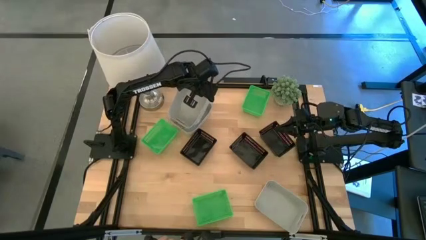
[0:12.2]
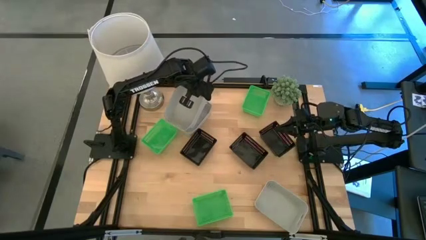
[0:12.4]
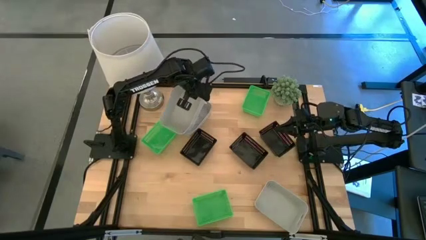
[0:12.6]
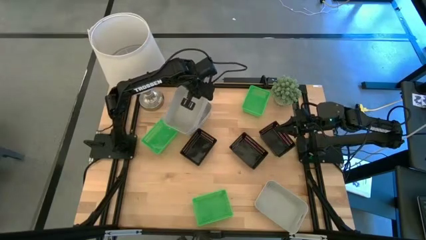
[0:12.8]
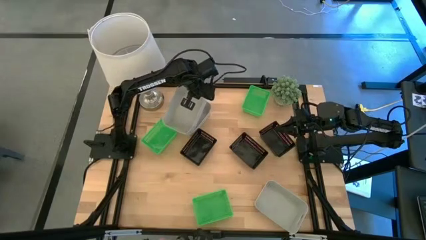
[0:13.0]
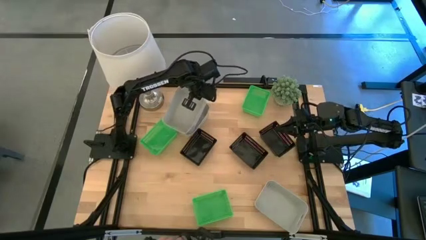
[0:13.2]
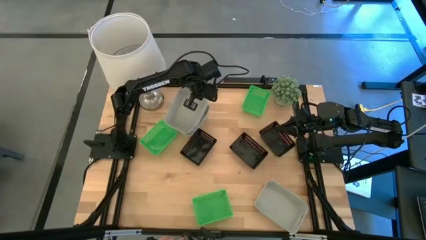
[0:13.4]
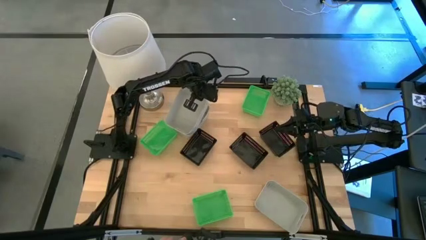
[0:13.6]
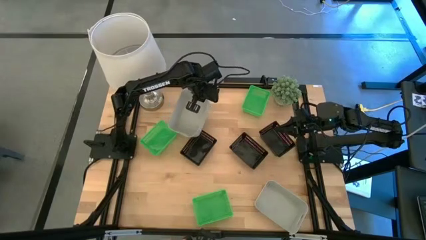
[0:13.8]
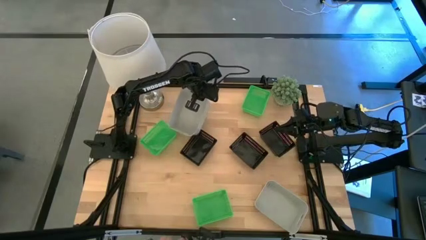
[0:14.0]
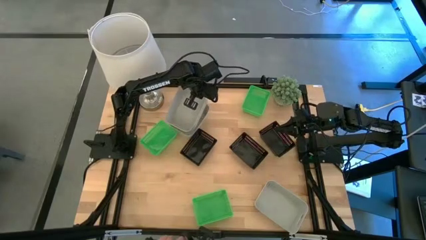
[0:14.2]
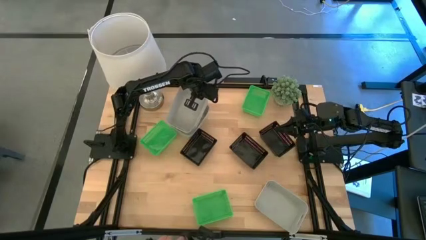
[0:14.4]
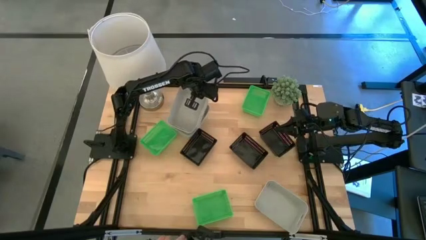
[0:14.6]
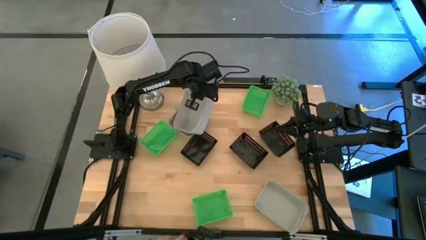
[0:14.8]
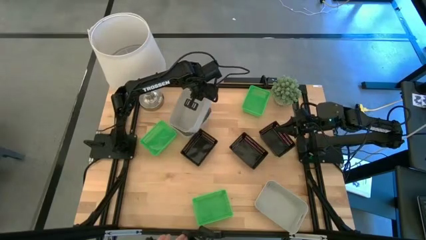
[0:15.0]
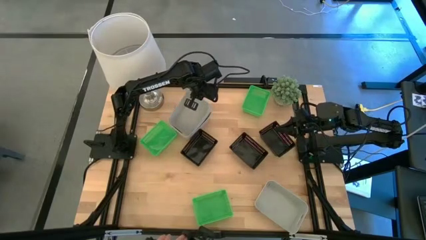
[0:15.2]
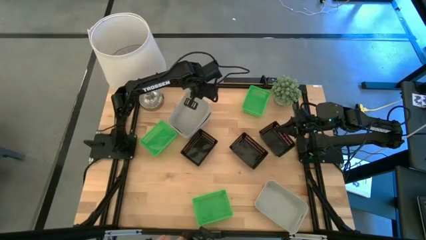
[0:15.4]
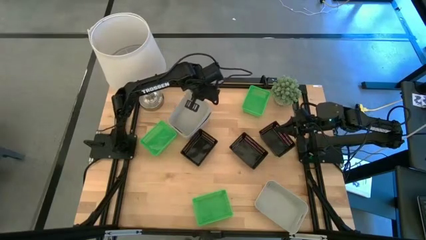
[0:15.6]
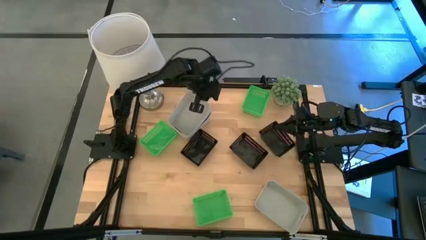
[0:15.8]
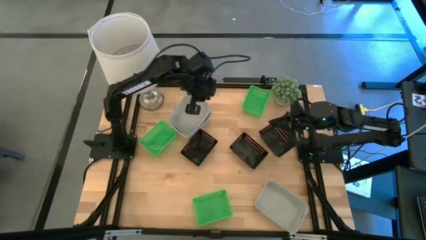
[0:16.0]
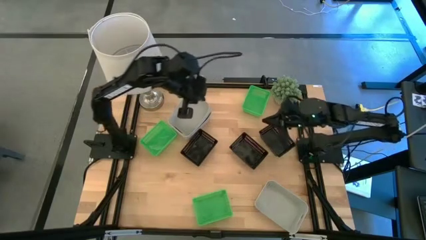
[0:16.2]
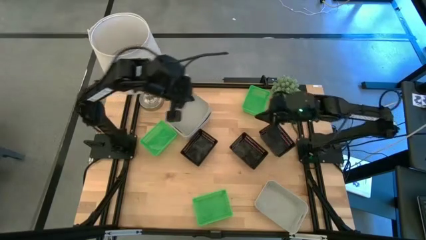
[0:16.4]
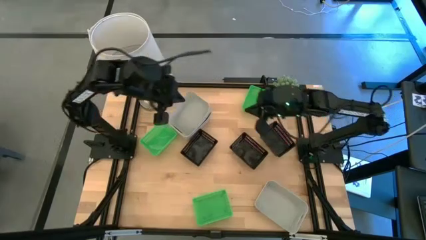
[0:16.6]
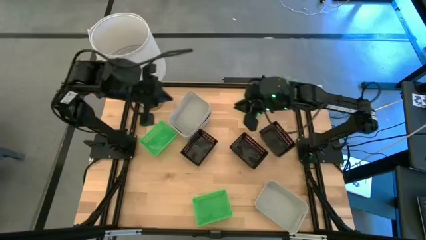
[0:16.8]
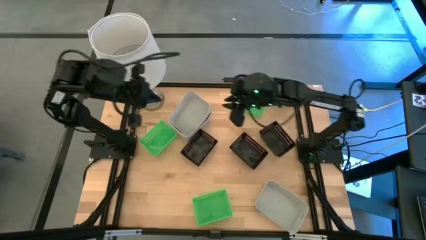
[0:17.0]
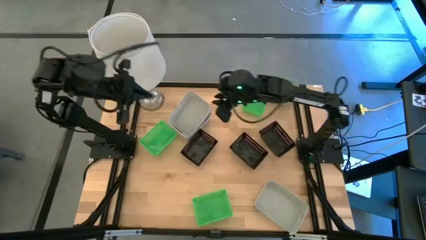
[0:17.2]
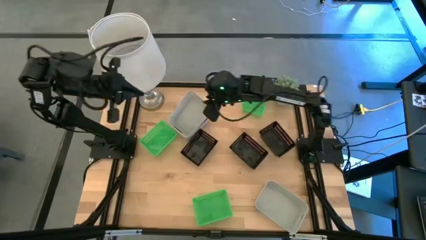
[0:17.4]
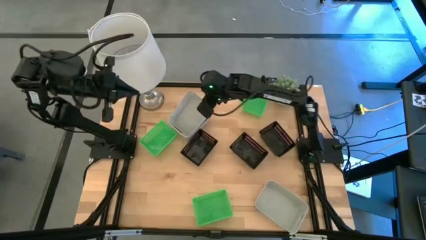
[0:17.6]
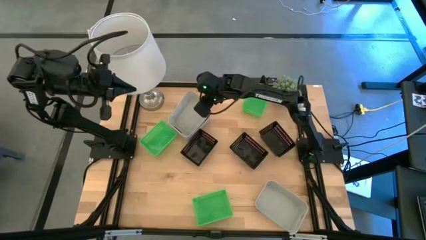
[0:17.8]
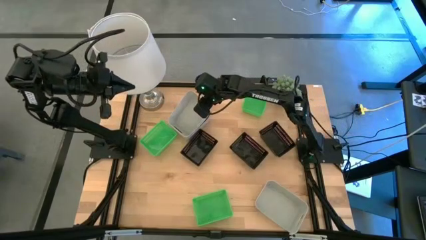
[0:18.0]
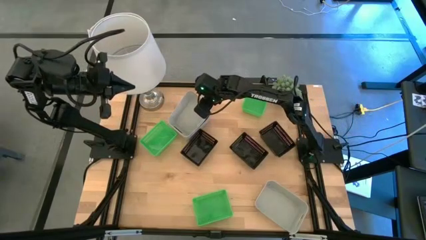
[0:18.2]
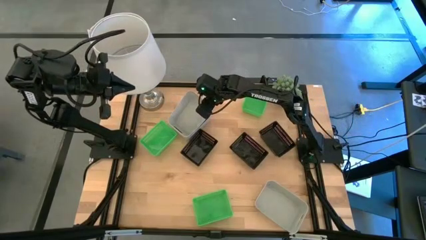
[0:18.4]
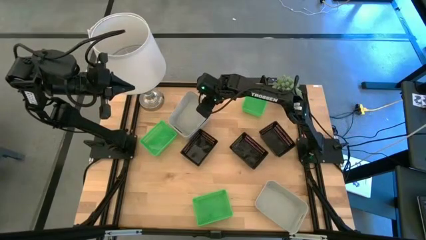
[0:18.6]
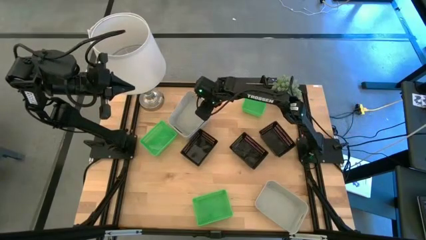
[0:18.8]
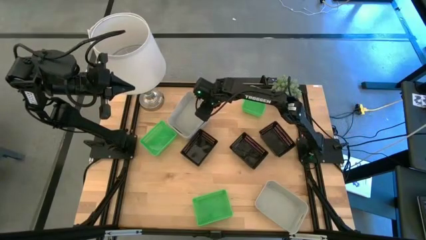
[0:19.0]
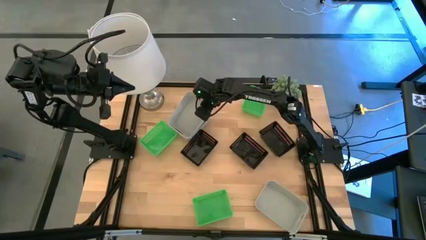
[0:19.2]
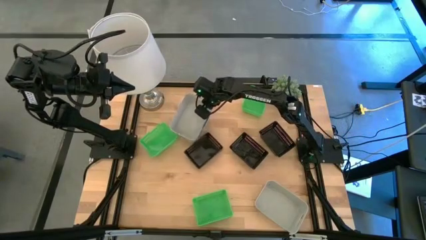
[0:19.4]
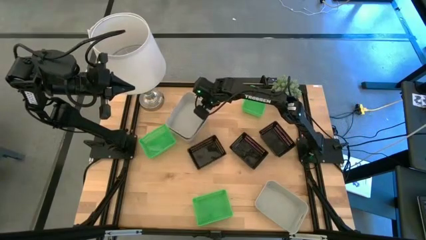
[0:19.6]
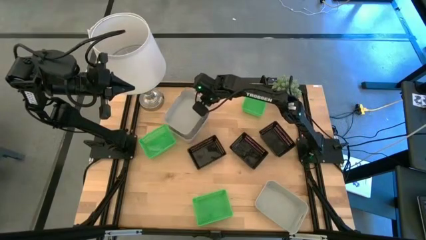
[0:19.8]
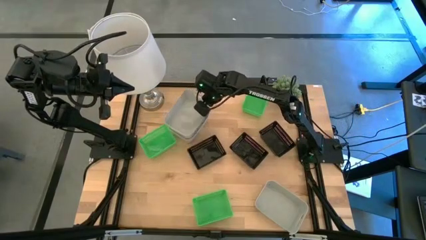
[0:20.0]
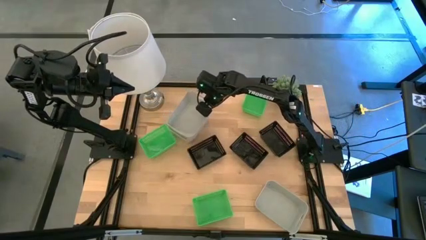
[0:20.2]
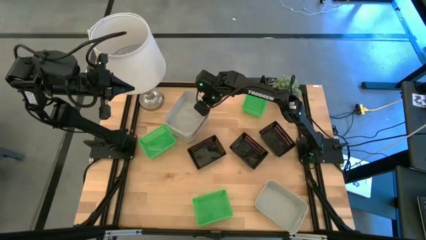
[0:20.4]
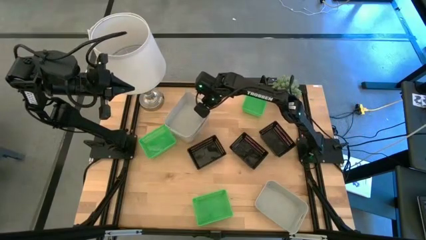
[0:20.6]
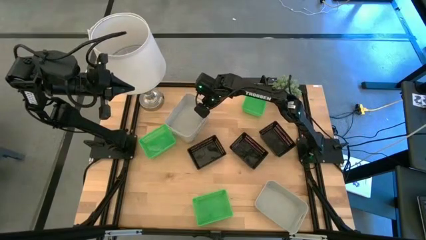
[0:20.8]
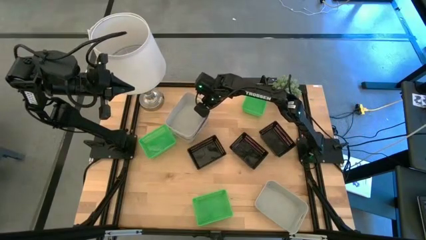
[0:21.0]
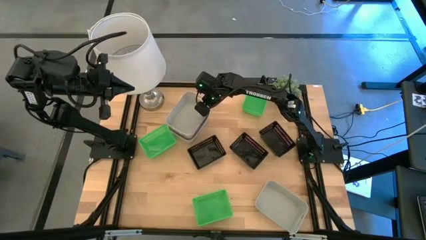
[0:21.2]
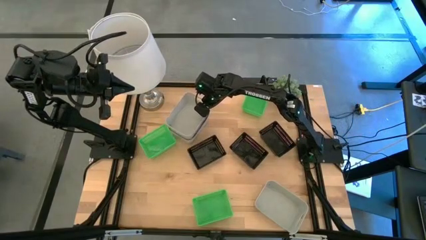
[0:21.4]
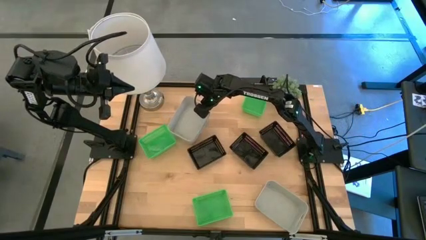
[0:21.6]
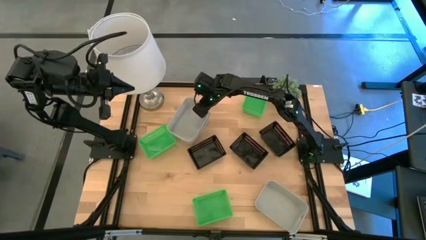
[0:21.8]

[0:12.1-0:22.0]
Stack the bottom left gray bin on top of the top gray bin
